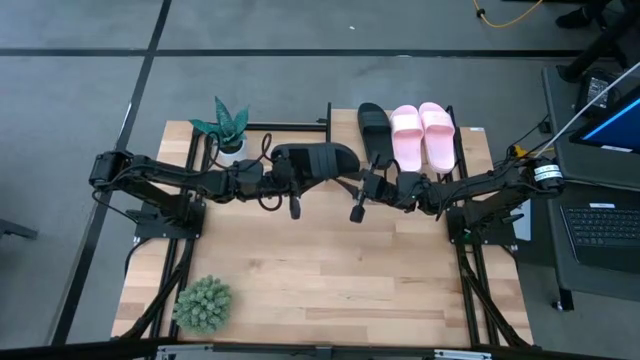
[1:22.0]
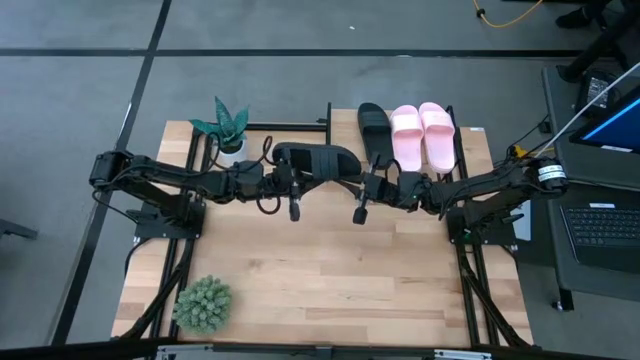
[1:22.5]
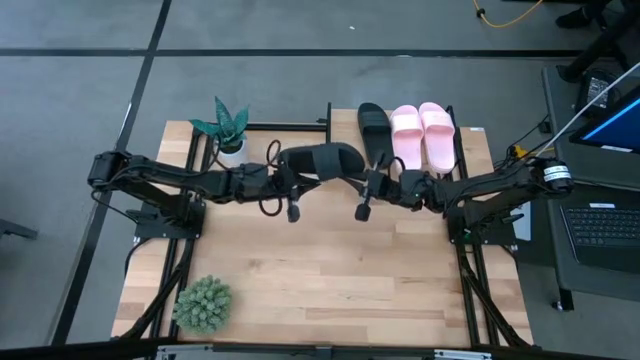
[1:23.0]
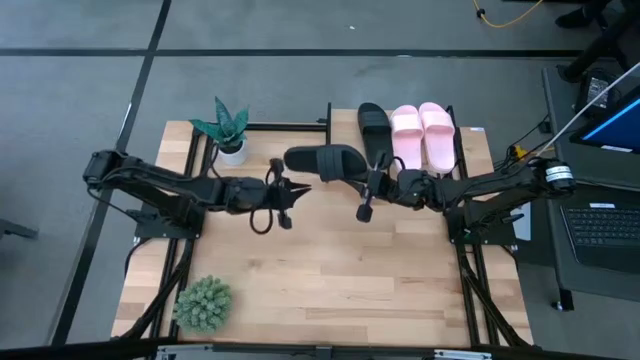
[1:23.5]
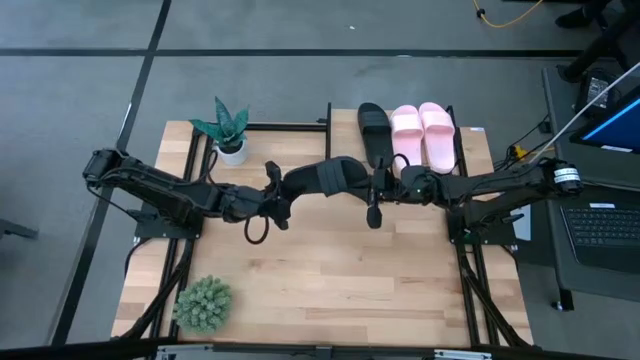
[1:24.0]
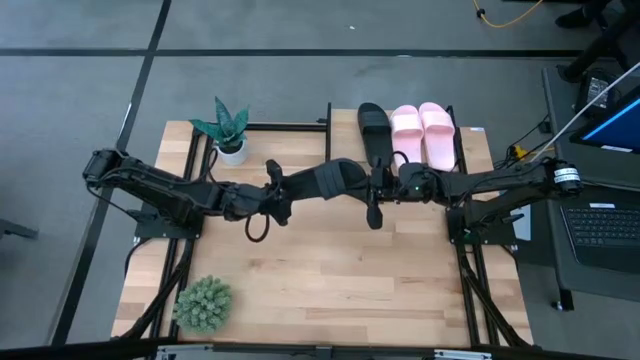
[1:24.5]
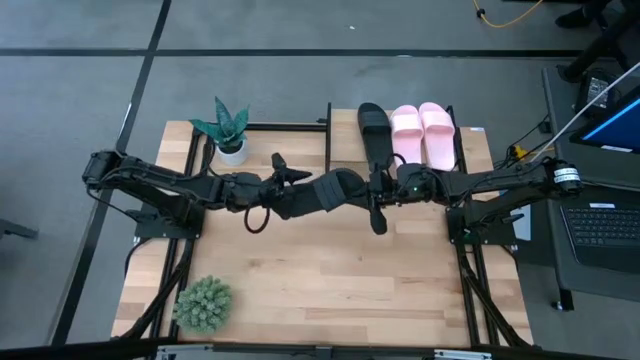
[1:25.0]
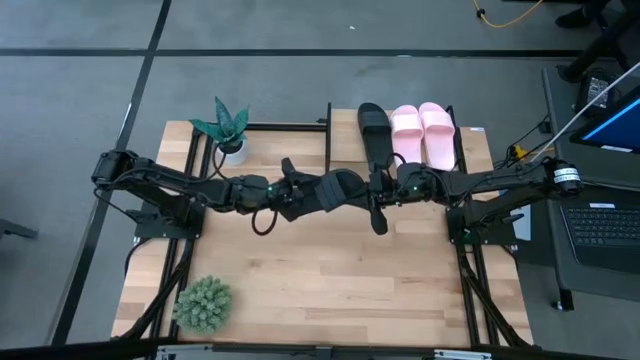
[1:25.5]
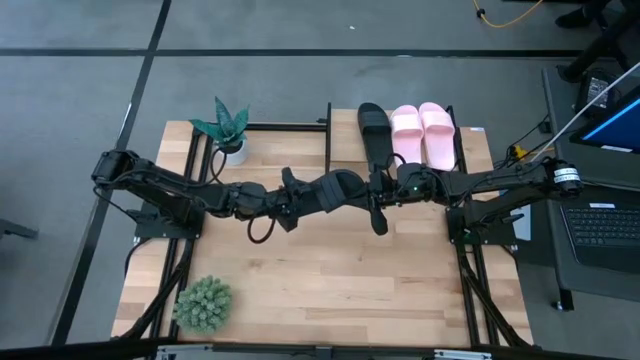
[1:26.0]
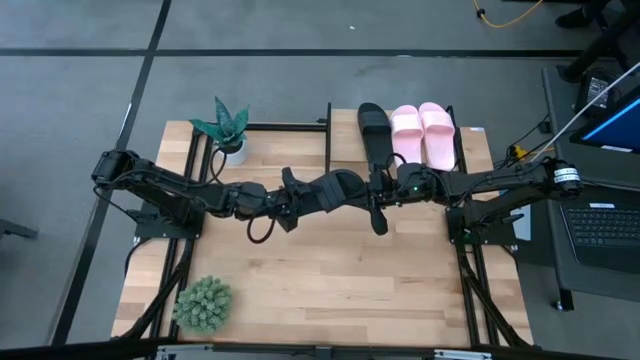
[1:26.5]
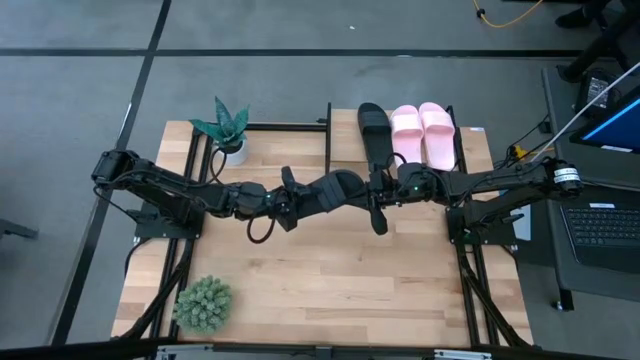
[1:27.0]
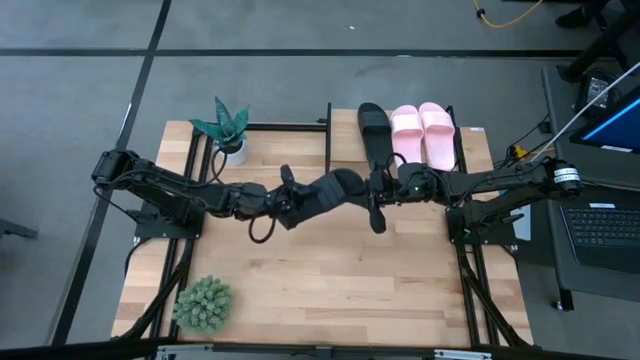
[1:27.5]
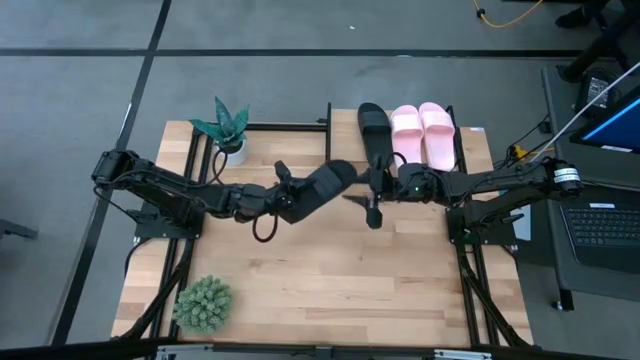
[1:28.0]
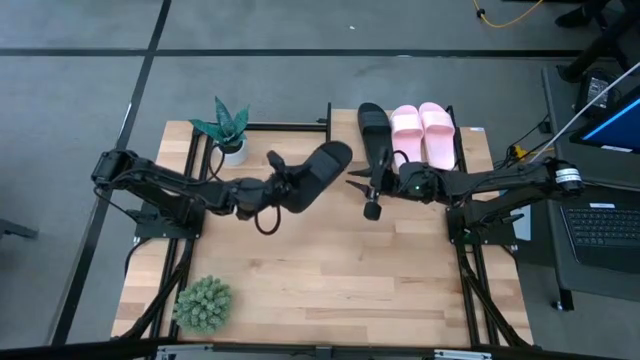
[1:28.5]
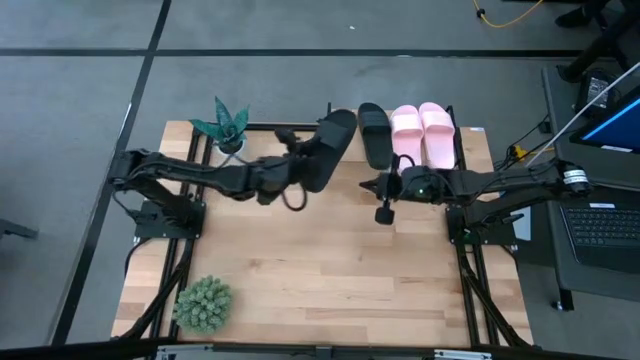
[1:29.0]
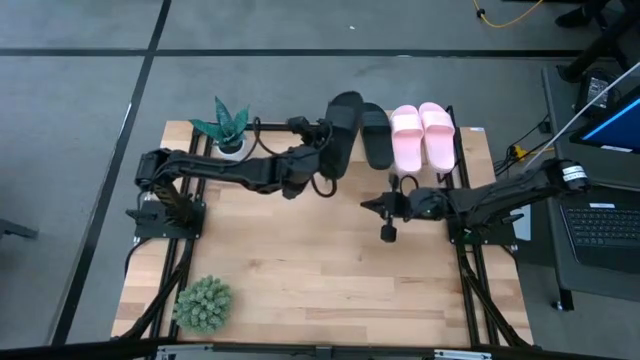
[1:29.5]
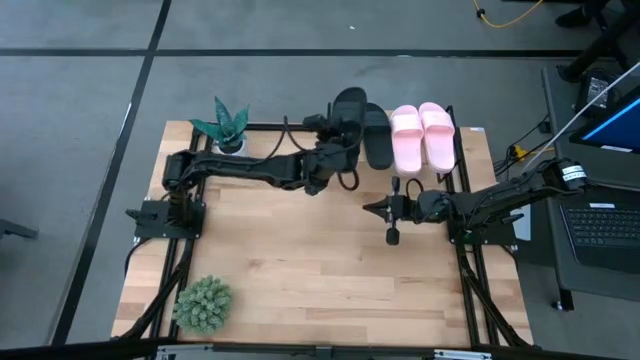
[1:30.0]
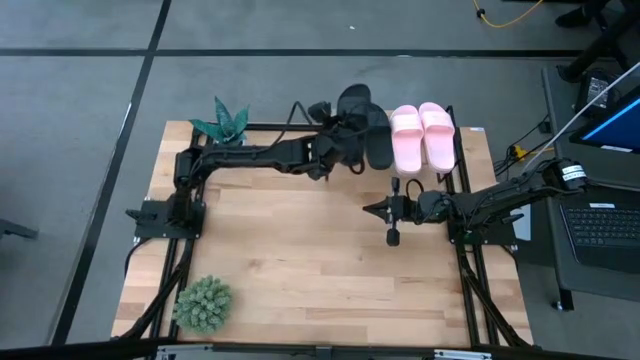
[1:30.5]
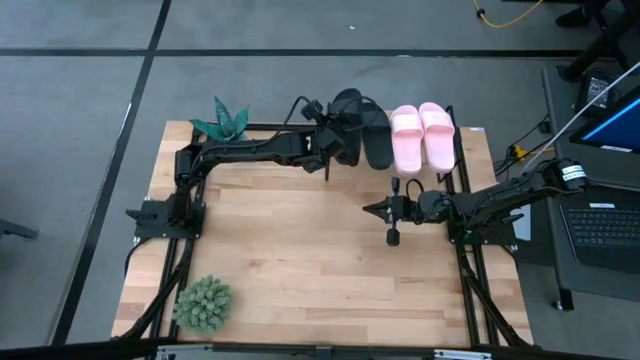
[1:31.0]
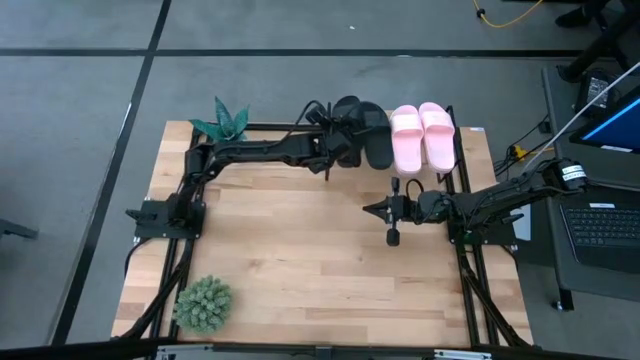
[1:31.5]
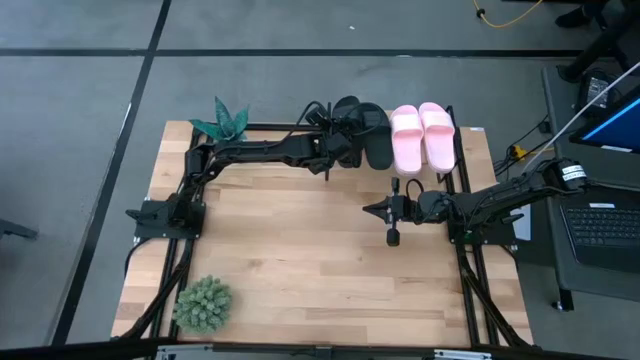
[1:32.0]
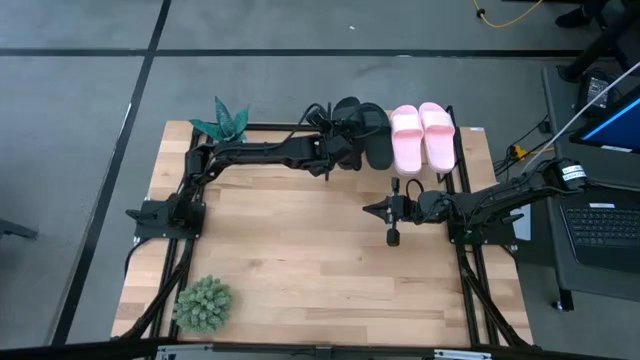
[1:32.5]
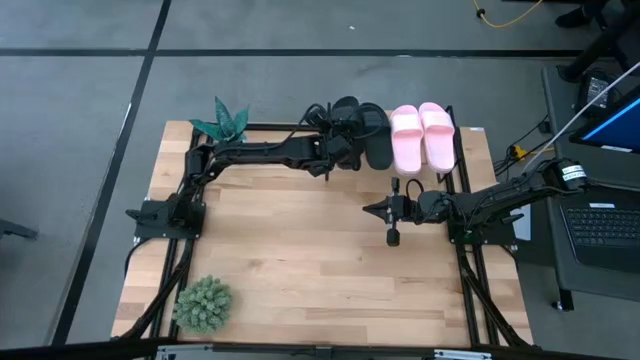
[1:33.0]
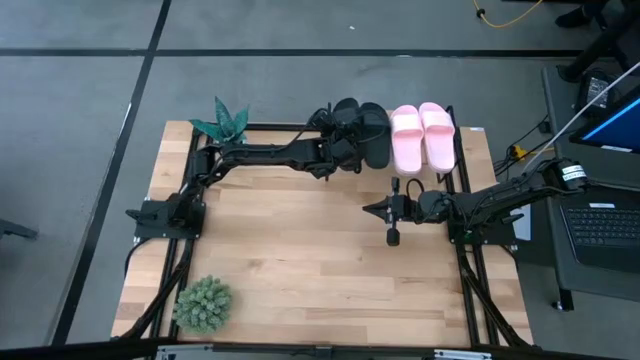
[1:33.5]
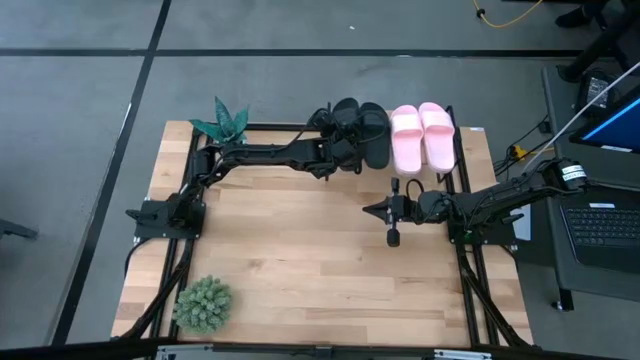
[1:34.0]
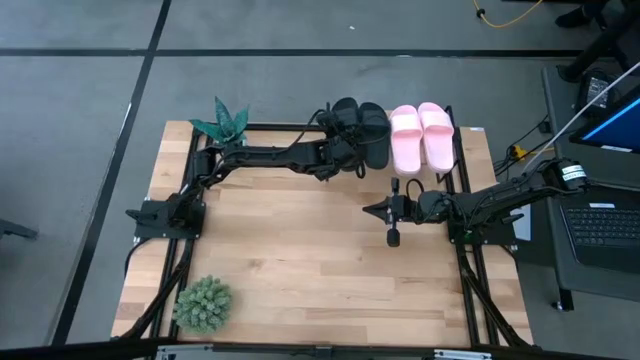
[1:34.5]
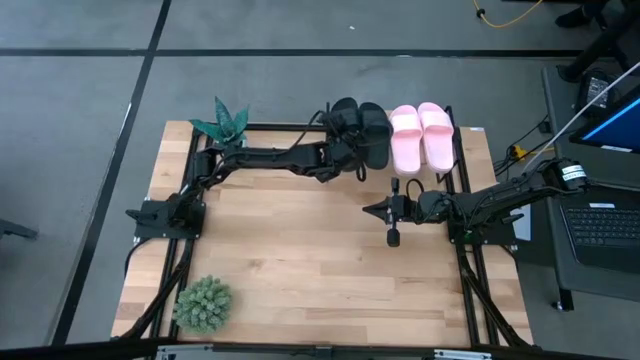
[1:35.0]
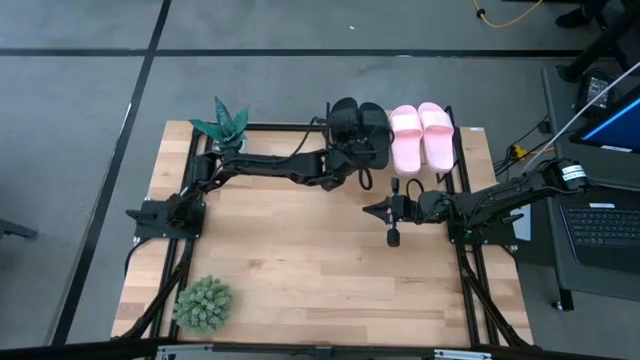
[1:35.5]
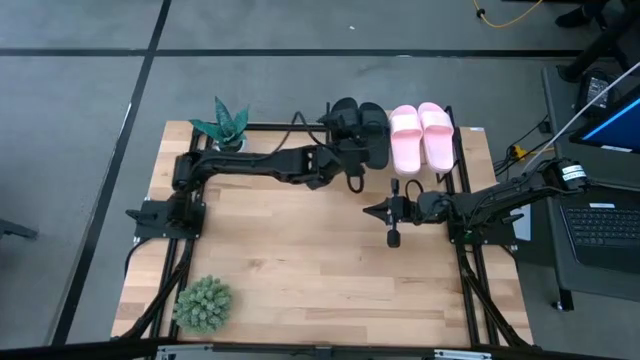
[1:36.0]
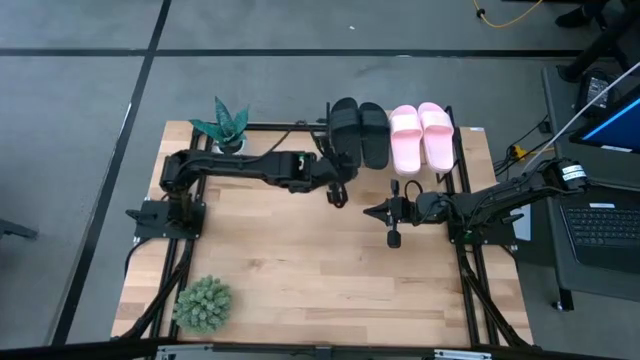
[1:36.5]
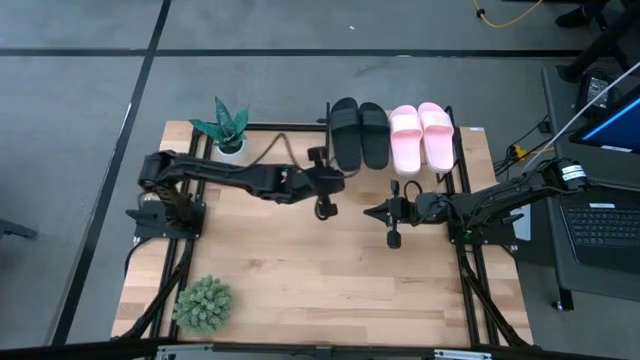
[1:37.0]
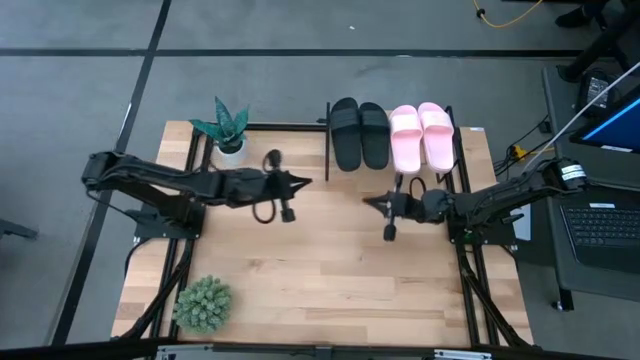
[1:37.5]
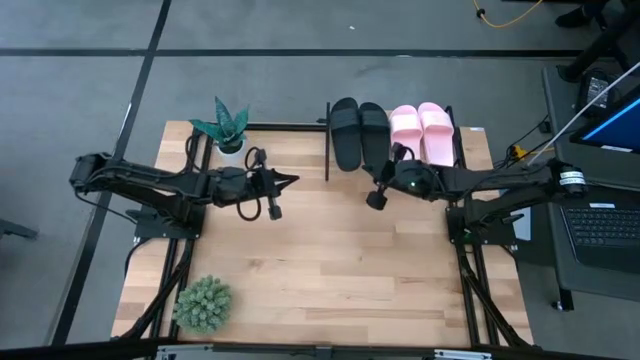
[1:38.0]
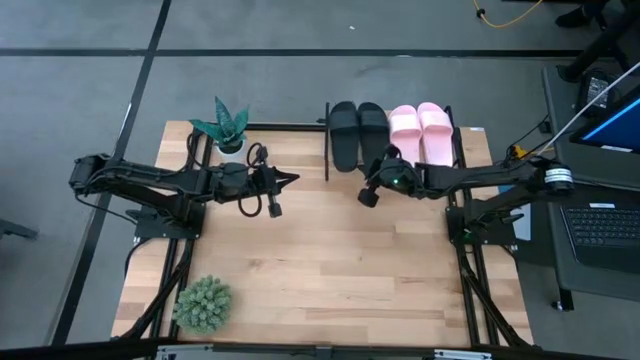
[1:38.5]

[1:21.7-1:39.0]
Task: Pick and place slides into the shelf
Put the black slide on the shelf

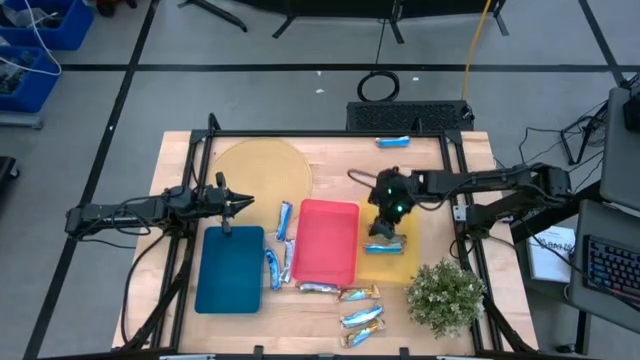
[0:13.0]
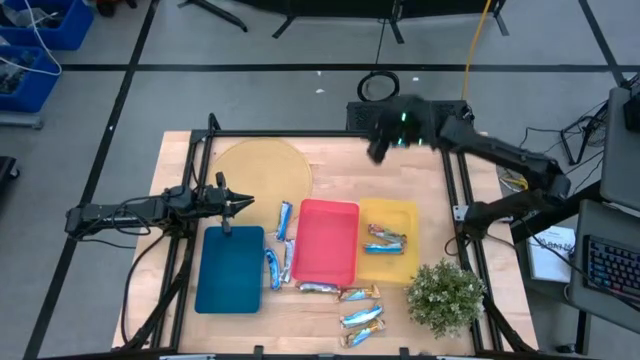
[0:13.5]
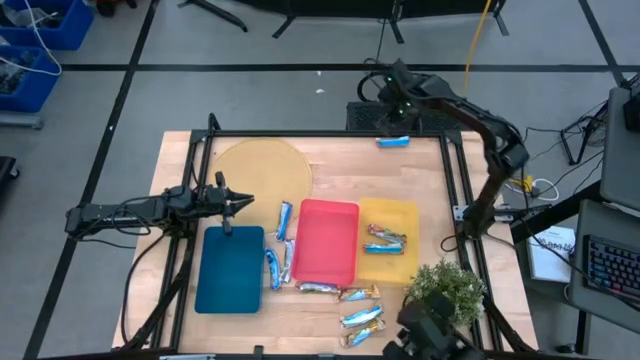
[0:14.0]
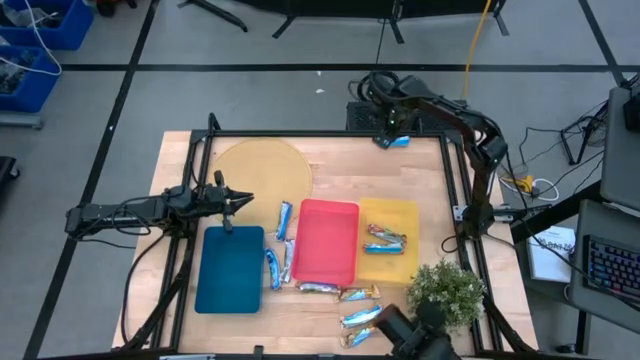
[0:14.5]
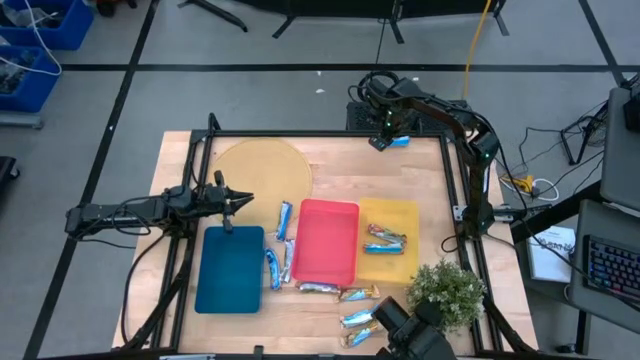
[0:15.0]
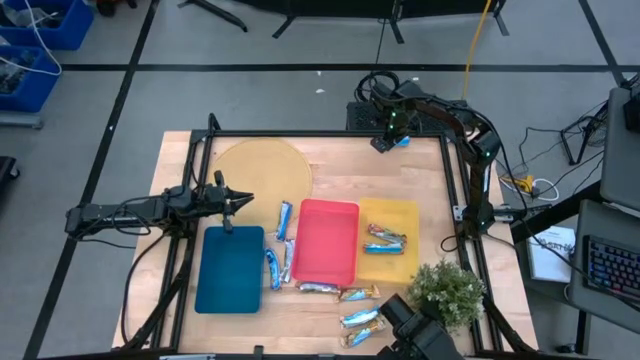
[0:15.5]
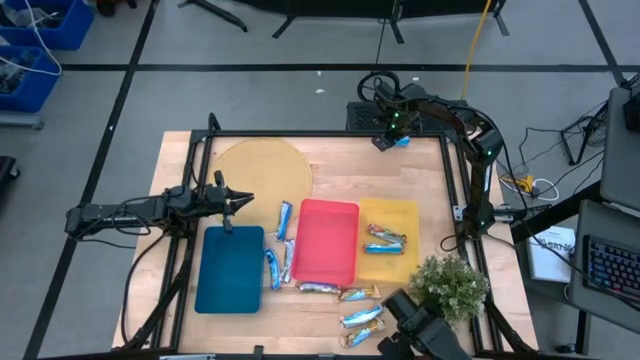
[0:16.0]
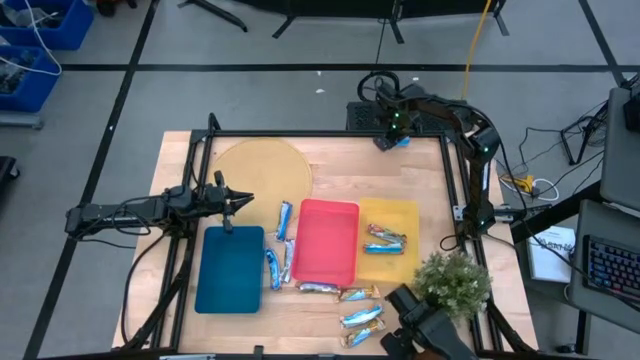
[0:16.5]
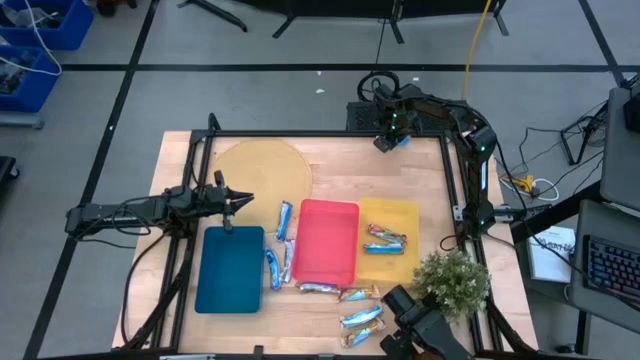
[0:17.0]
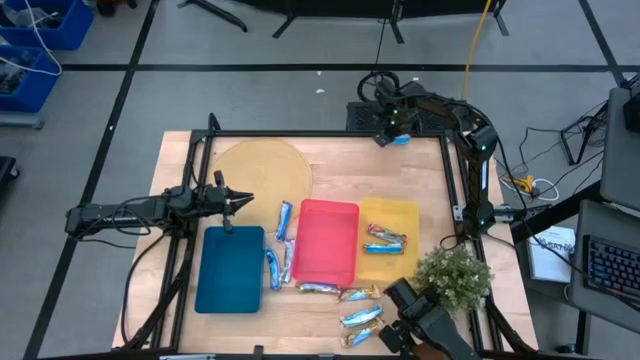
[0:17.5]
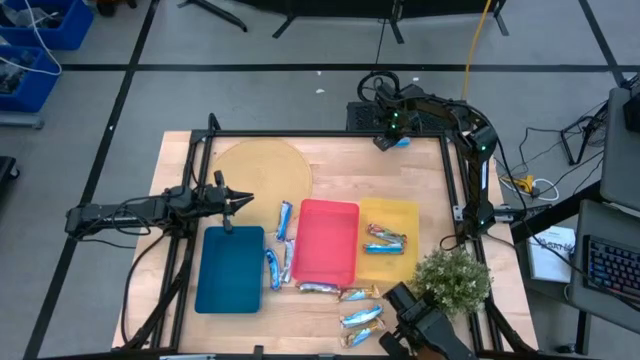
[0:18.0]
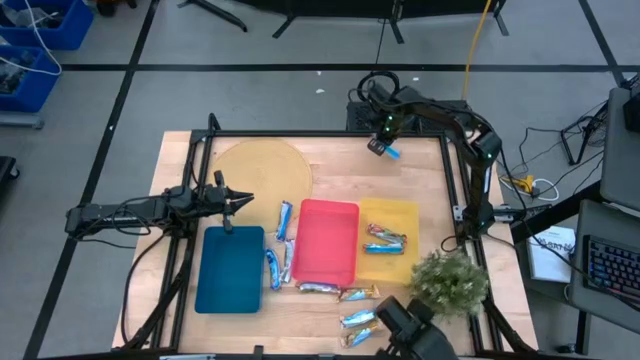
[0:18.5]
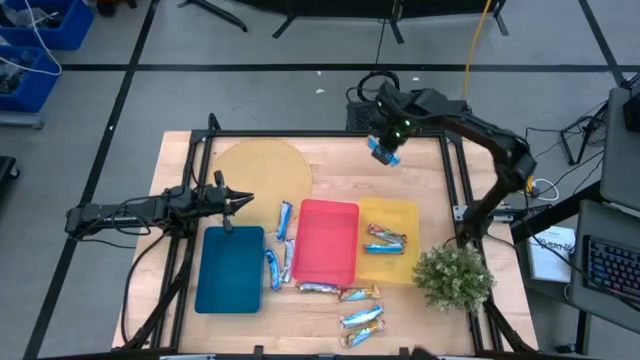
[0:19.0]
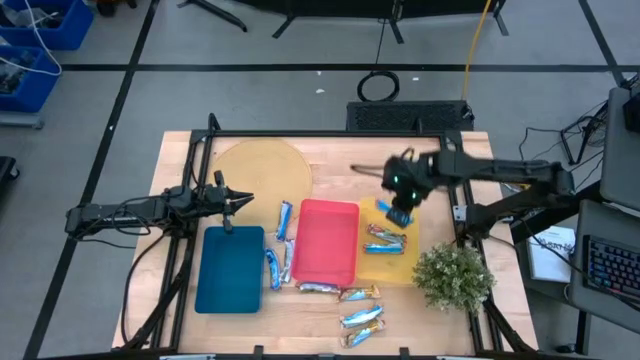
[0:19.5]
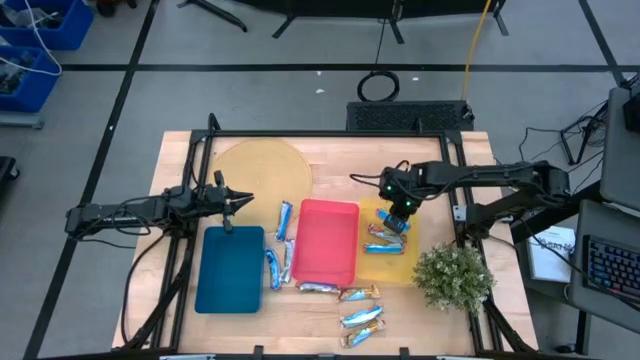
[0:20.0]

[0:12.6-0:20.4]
Task: Pick and place Granola Bars by type
Put the red granola bar into the yellow bin
